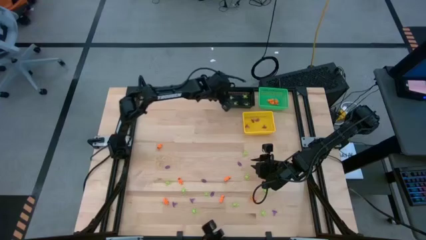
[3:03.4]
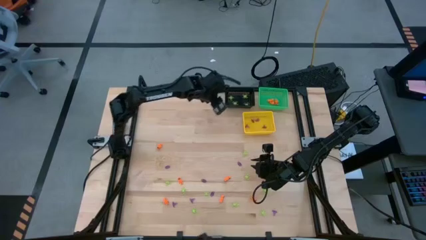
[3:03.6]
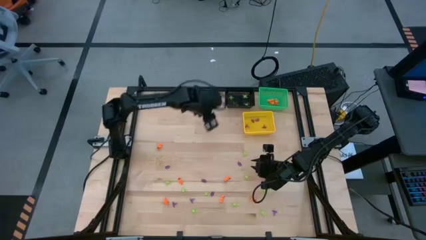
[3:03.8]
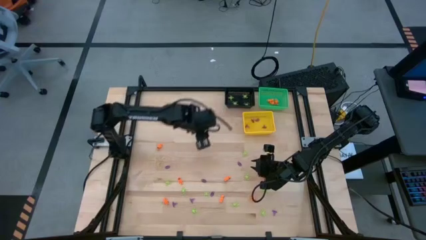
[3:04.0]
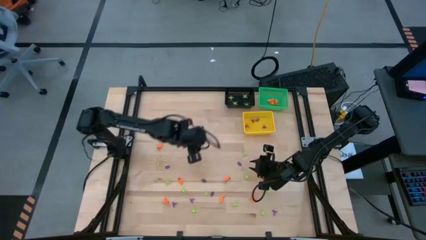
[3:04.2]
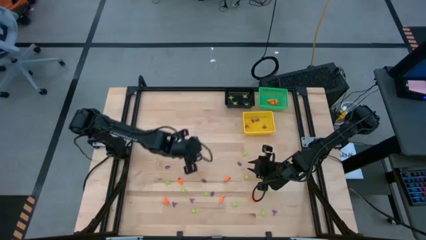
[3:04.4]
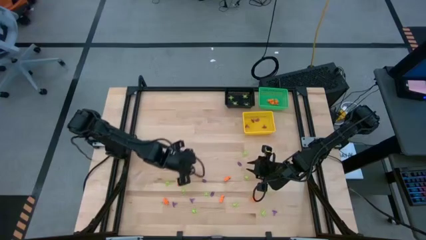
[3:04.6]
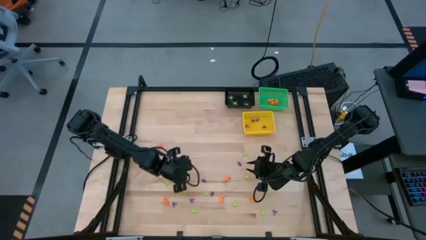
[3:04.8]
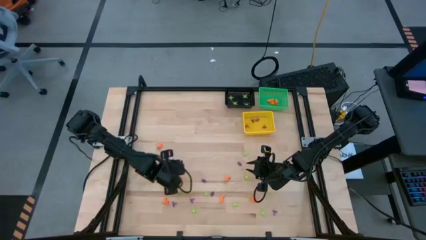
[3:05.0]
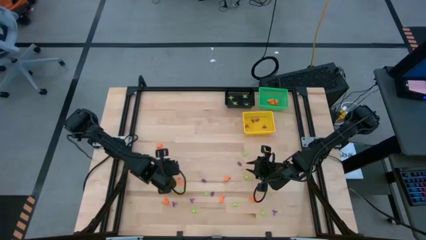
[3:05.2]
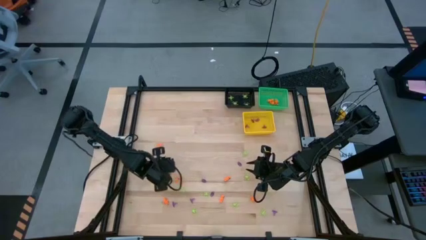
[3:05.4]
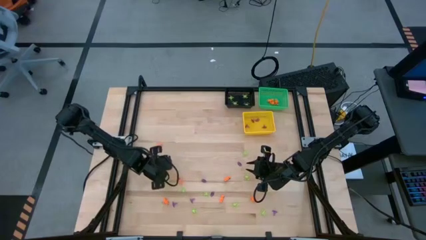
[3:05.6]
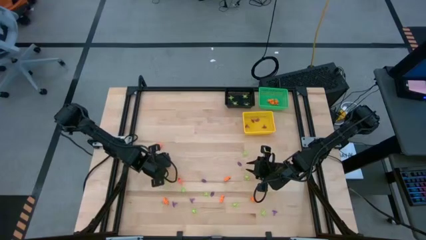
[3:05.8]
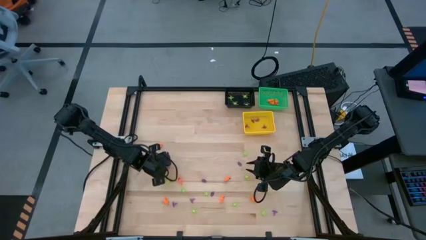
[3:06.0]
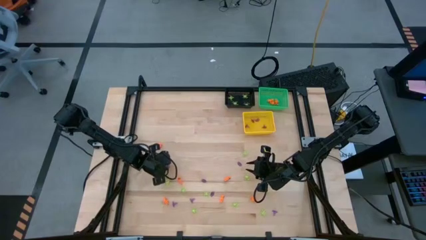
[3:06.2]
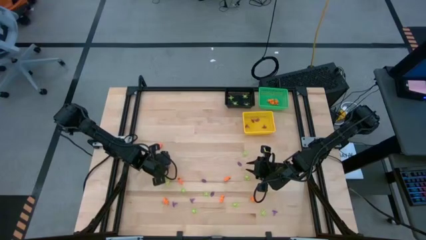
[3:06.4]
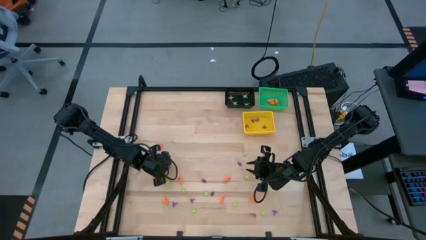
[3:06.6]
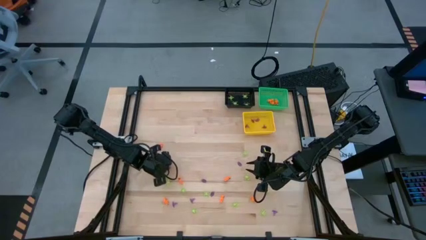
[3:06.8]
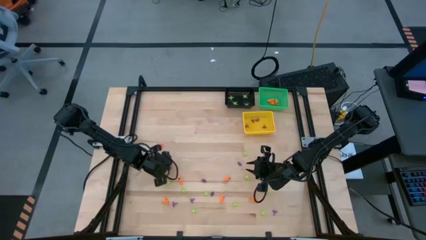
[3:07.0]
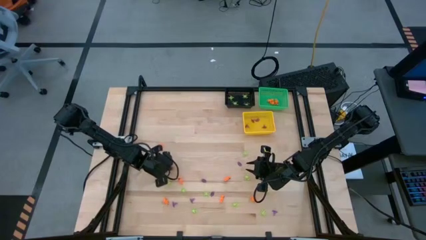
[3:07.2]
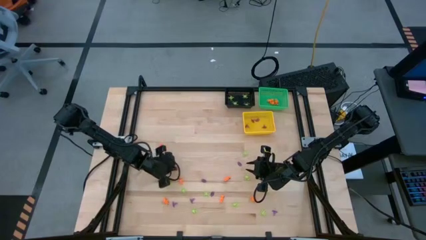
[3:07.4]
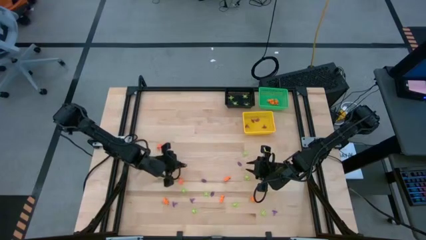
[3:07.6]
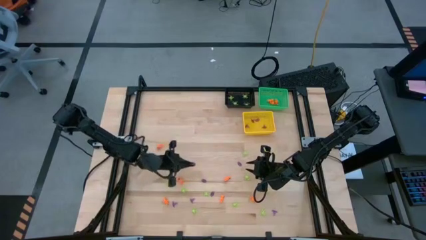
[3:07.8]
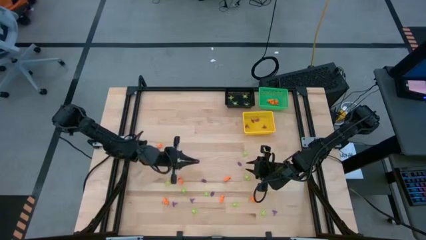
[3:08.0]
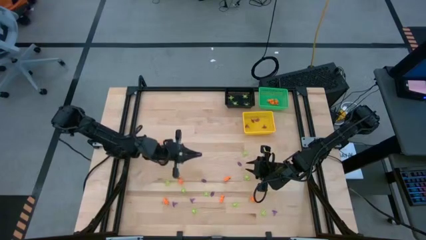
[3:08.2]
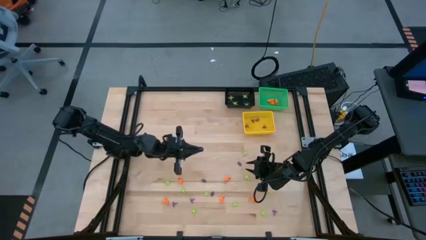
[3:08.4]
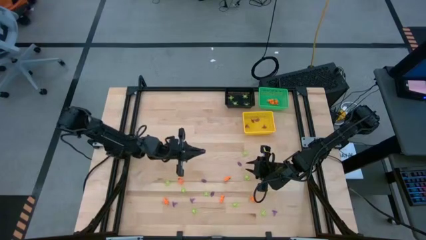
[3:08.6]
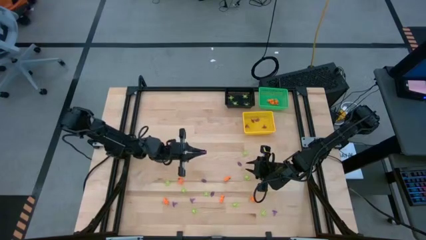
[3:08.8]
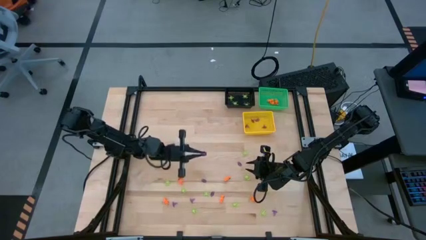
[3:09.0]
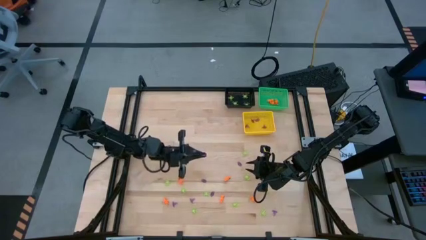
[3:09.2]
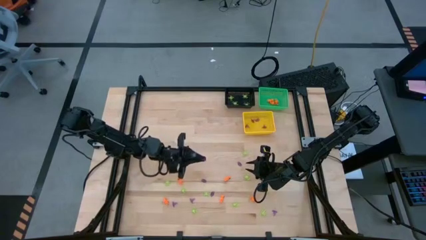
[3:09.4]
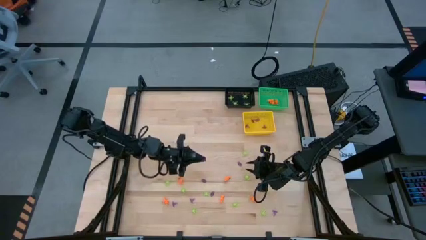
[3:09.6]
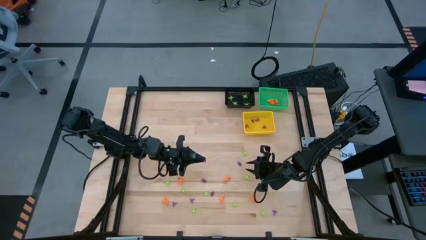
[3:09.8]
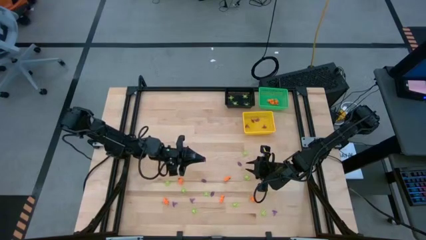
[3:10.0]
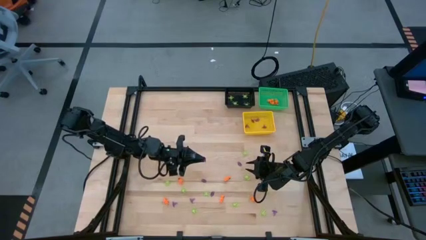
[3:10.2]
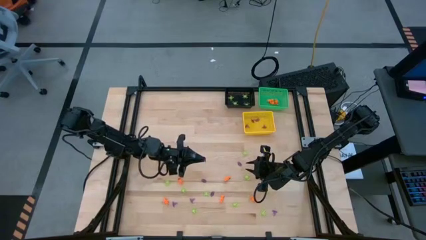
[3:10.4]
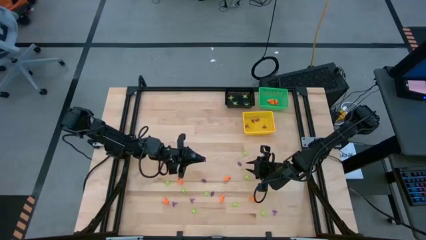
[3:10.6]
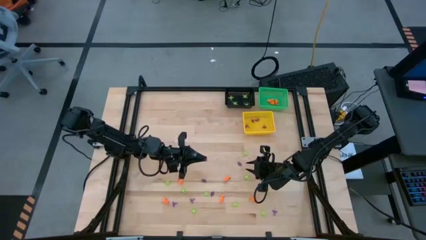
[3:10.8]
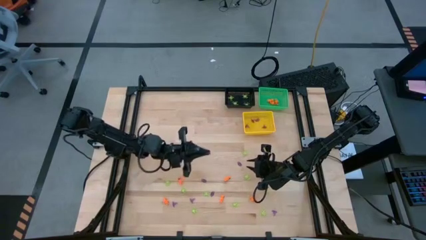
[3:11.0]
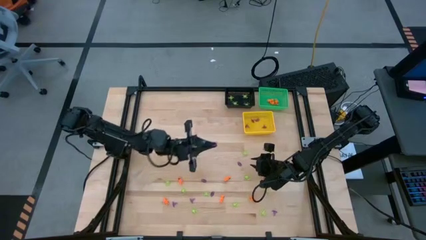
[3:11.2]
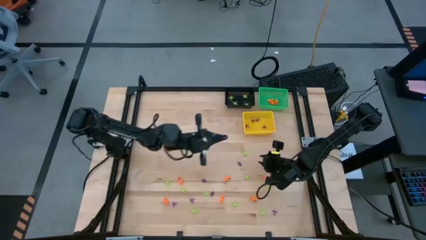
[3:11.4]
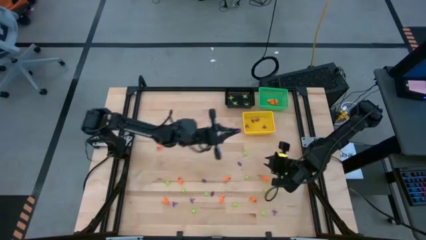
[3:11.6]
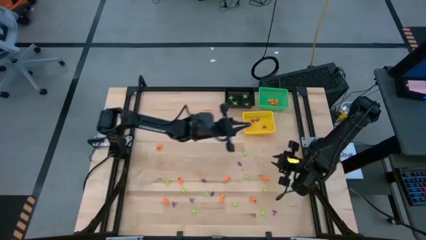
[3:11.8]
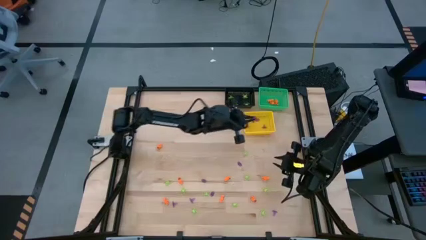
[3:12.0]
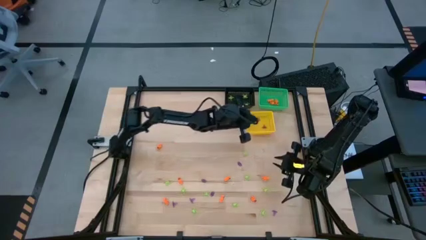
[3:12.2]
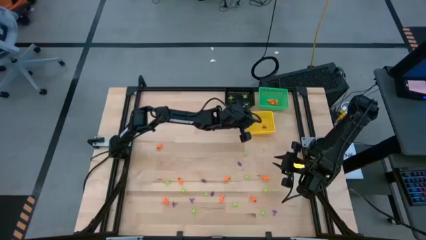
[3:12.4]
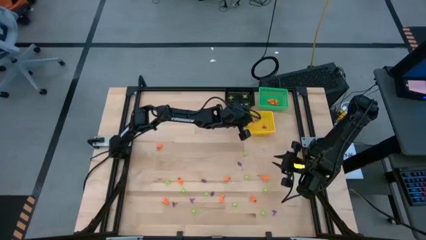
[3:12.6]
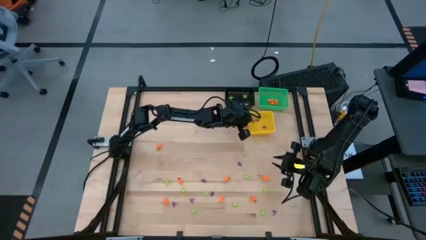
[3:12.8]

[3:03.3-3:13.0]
Task: Sort Halloween decoration
Put the violet witch hat toy into the yellow basket

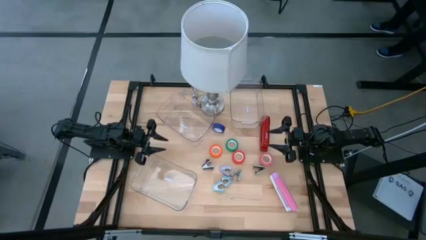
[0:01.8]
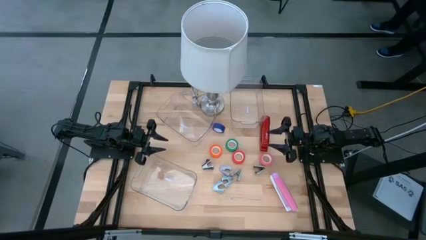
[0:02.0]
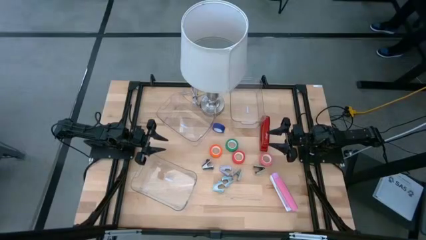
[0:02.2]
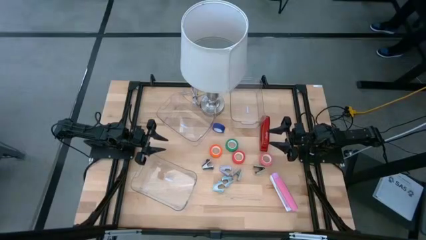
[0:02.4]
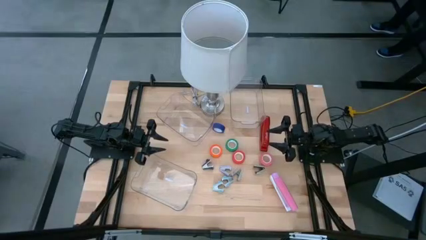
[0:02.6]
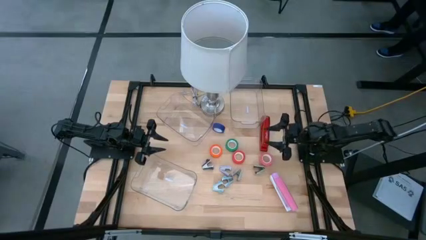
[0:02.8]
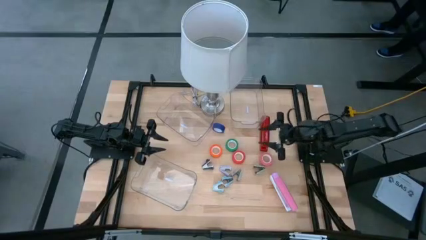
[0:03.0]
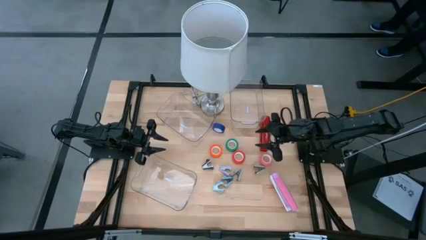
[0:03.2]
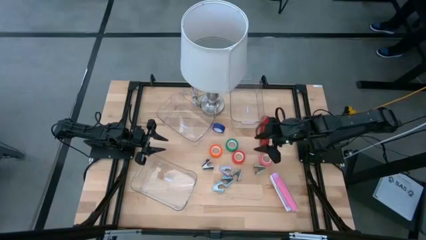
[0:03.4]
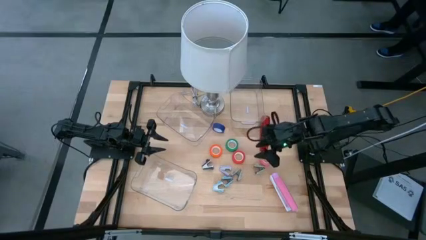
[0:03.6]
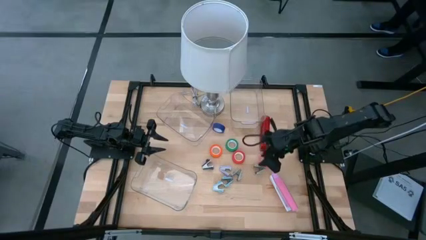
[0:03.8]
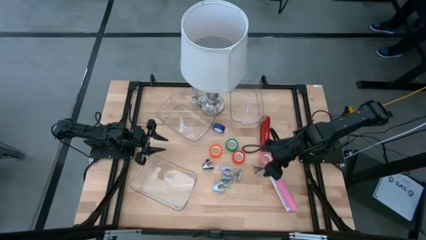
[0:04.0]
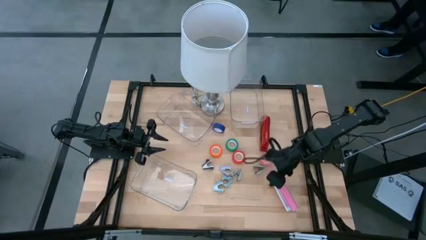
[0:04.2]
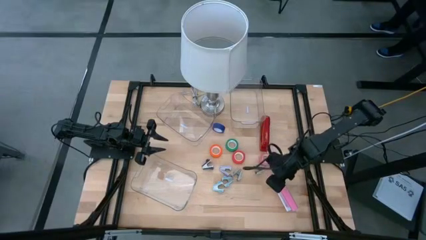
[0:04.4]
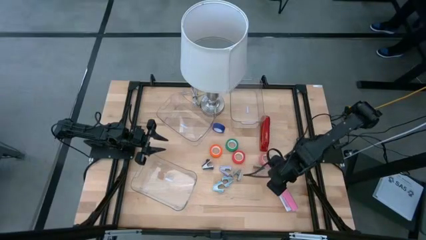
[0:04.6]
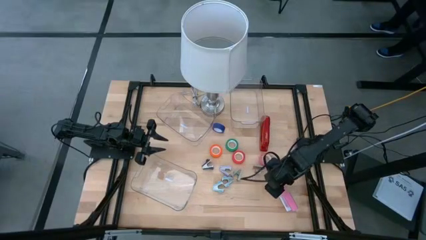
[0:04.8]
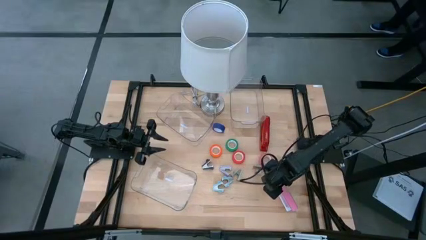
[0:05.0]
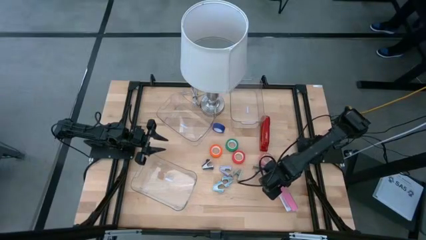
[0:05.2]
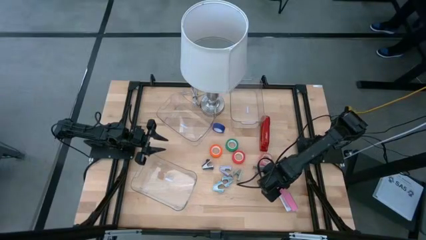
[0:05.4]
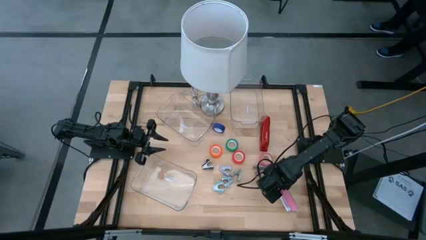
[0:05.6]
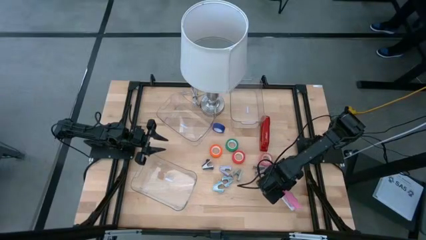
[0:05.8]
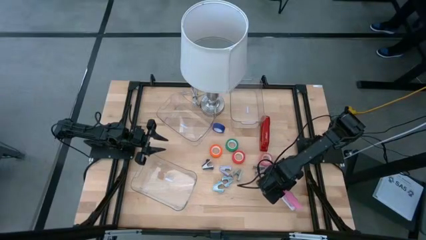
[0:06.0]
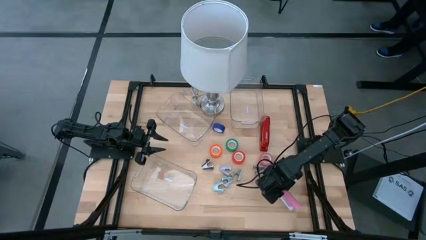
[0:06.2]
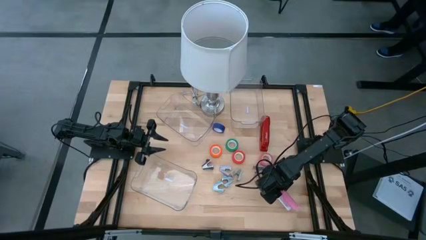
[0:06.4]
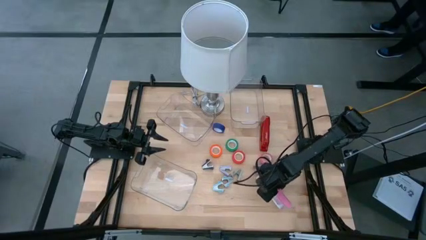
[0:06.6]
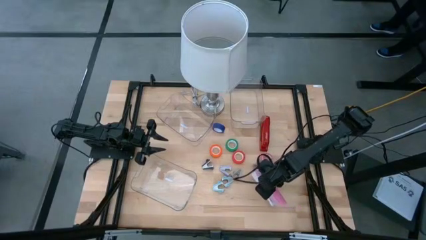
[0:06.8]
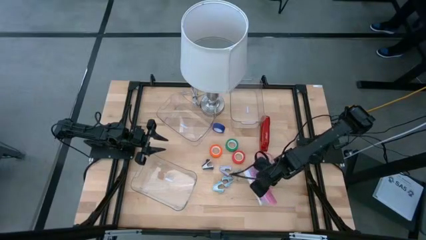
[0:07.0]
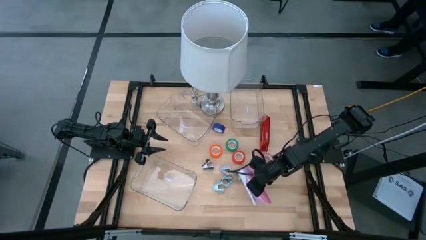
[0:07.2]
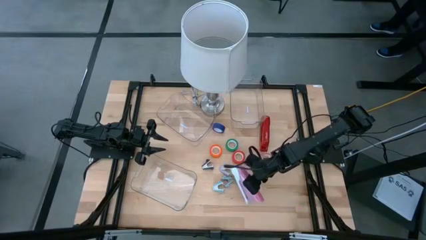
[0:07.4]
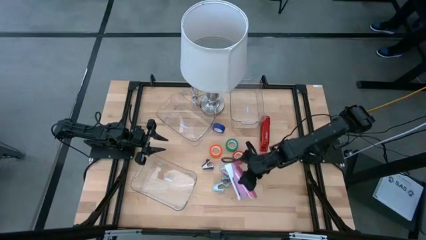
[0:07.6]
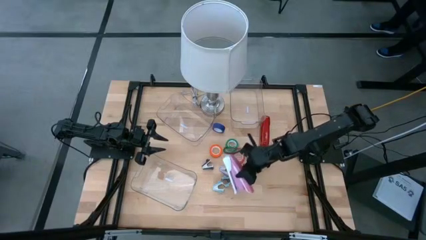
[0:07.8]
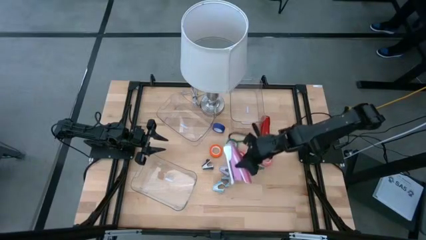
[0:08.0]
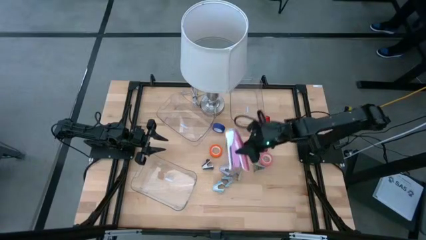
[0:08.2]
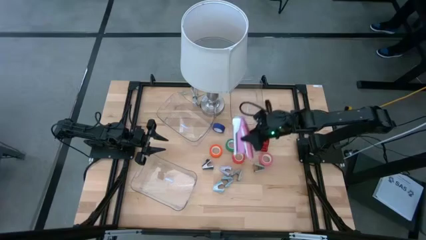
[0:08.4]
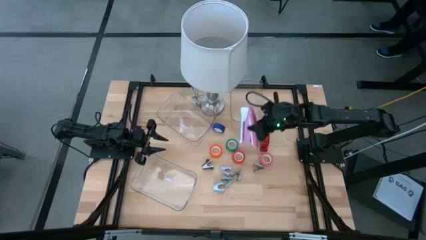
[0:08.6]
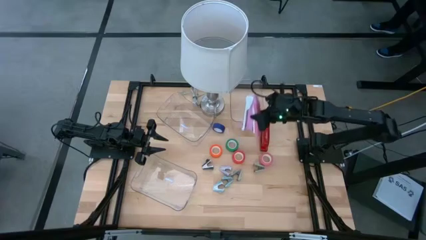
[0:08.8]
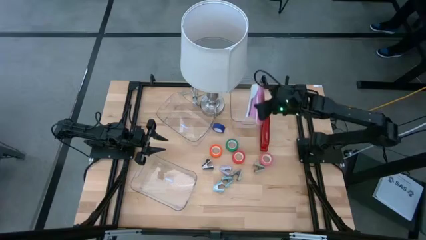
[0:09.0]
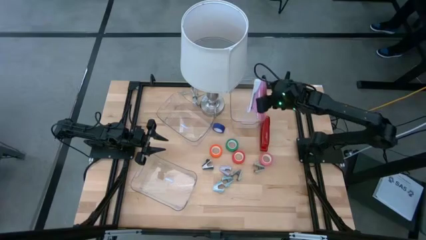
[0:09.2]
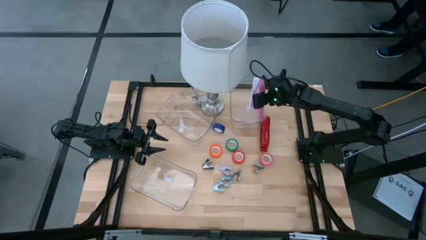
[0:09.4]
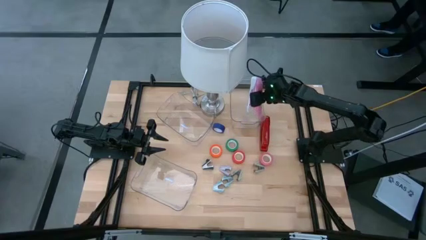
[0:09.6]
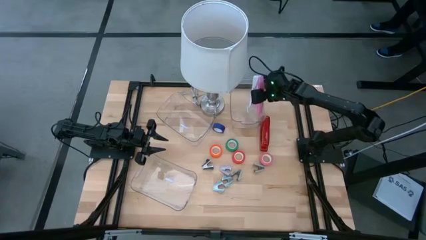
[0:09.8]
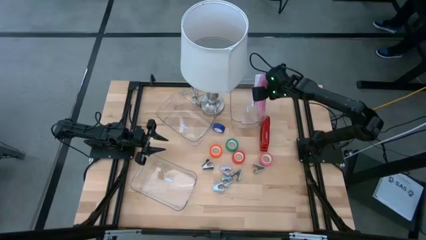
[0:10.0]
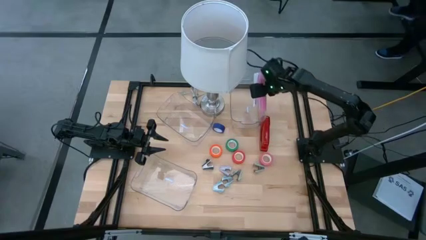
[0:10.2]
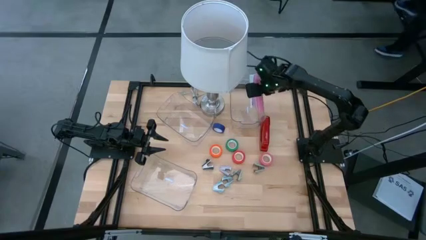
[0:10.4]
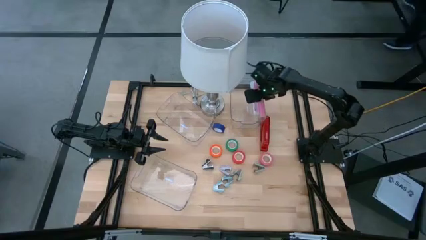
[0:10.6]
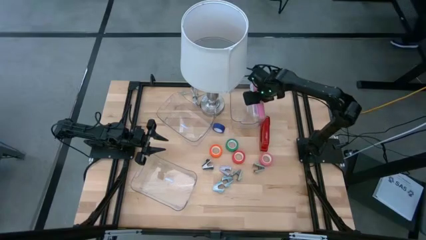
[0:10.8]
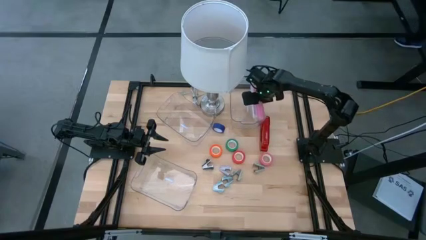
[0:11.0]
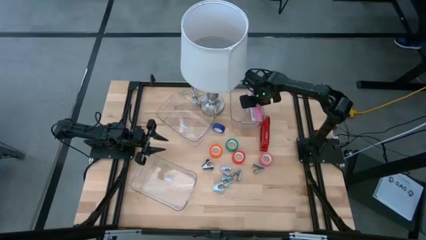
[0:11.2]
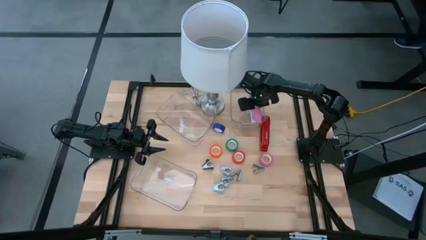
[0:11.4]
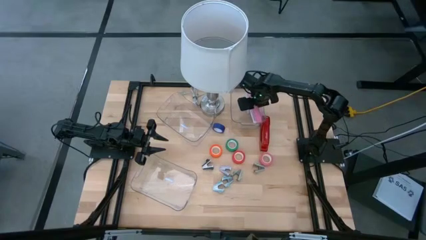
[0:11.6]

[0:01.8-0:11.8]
Task: Pick and place Stapler, Stapler remover, tape
Put the pink stapler into the top right transparent bin
